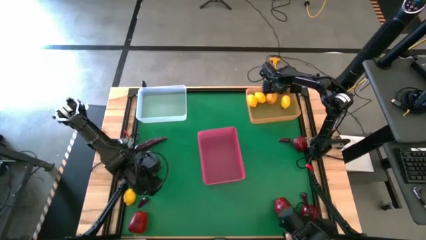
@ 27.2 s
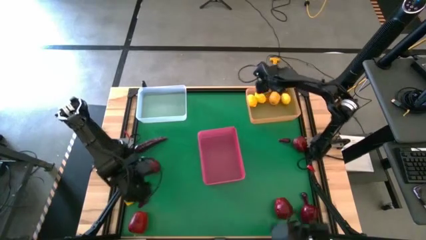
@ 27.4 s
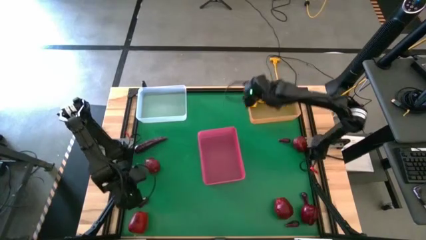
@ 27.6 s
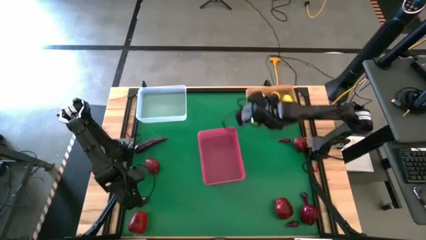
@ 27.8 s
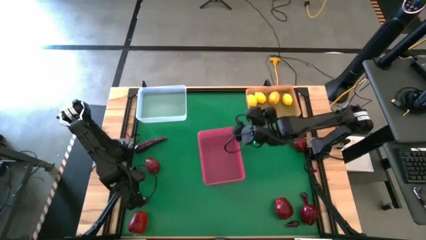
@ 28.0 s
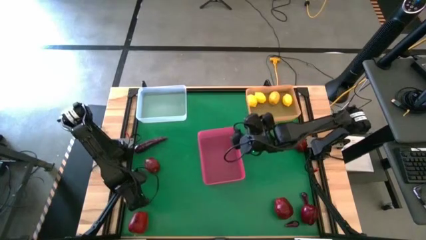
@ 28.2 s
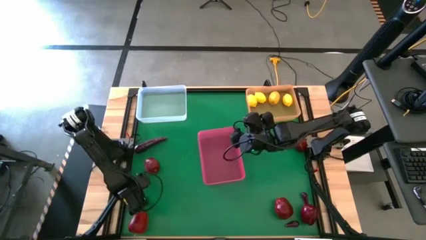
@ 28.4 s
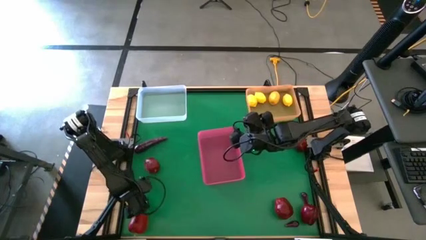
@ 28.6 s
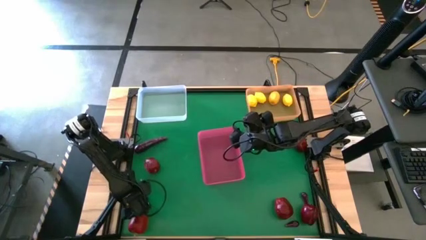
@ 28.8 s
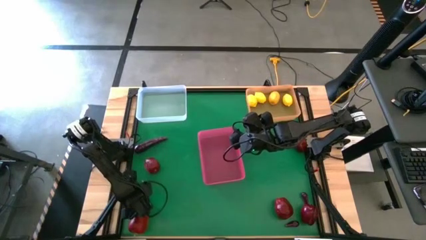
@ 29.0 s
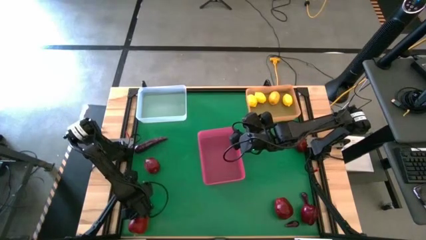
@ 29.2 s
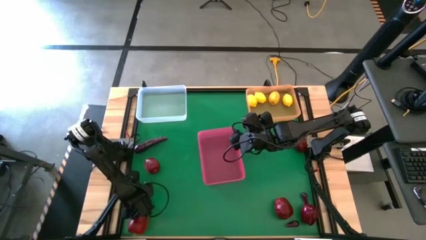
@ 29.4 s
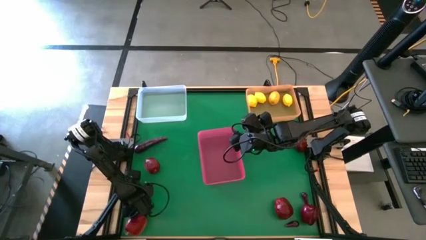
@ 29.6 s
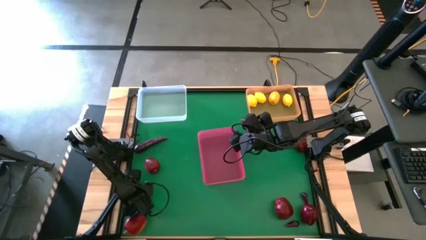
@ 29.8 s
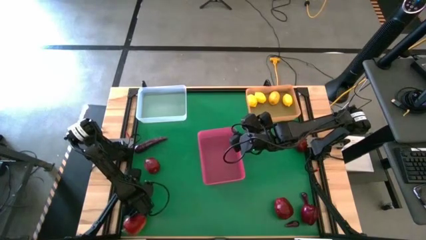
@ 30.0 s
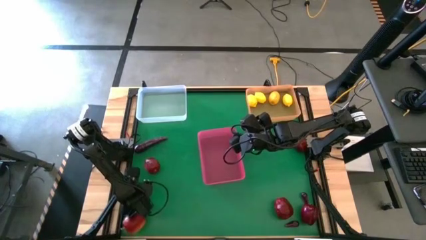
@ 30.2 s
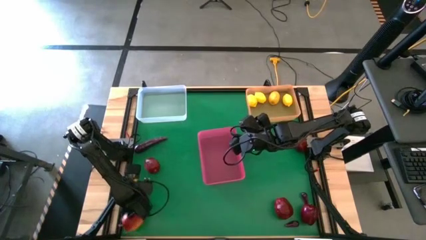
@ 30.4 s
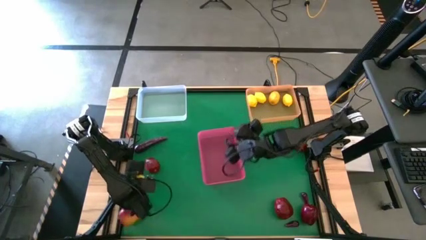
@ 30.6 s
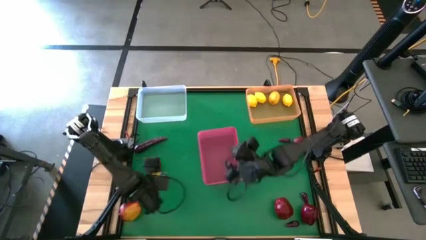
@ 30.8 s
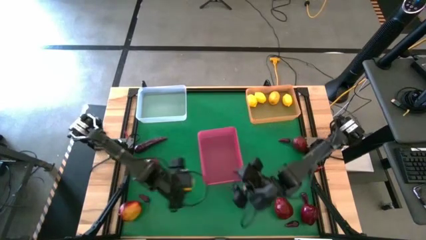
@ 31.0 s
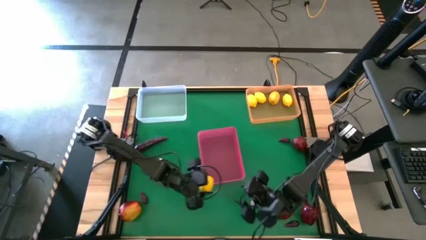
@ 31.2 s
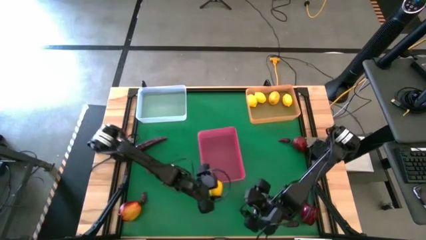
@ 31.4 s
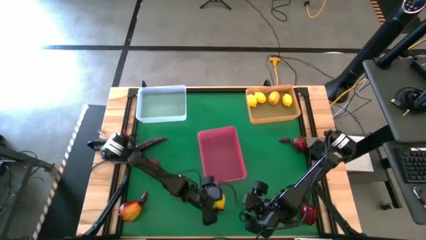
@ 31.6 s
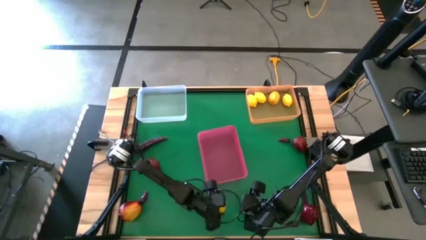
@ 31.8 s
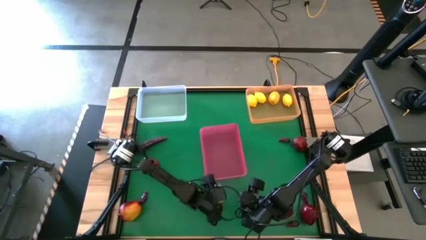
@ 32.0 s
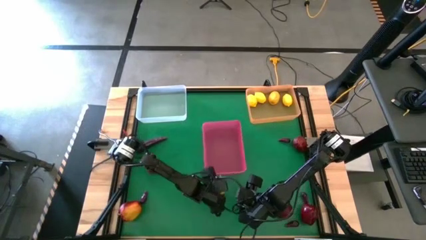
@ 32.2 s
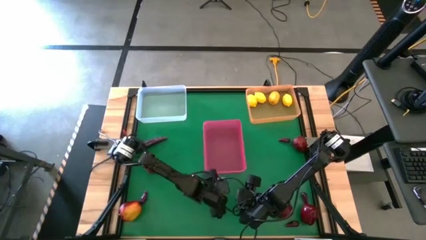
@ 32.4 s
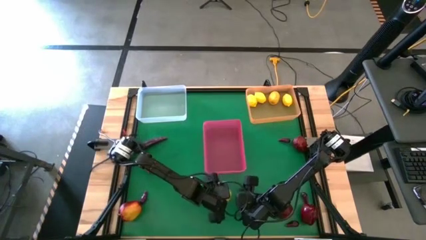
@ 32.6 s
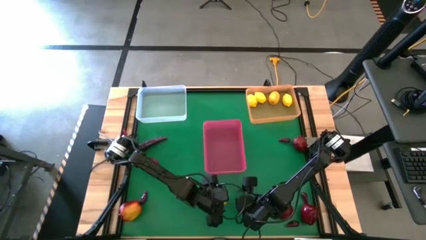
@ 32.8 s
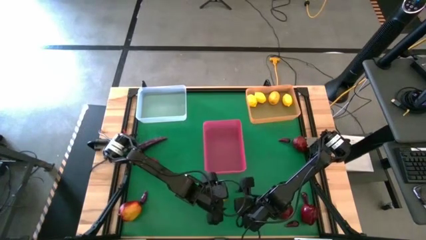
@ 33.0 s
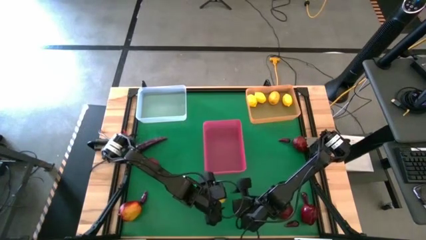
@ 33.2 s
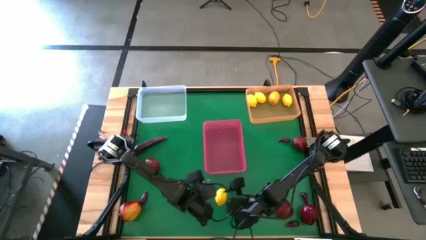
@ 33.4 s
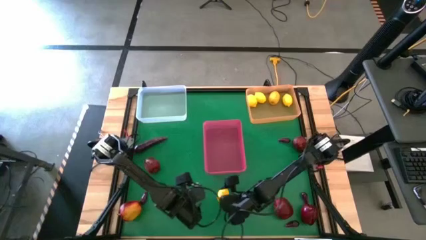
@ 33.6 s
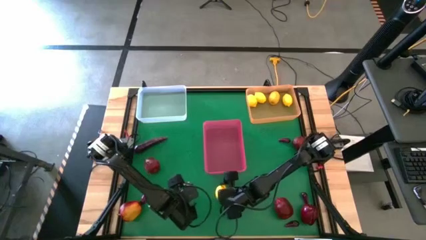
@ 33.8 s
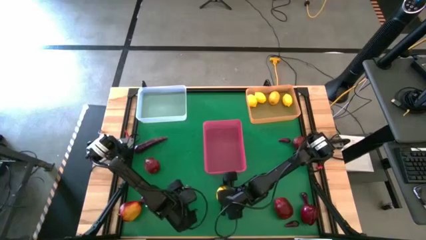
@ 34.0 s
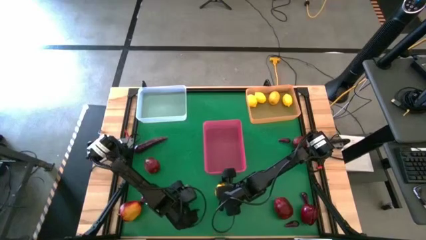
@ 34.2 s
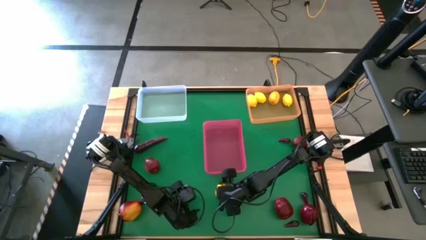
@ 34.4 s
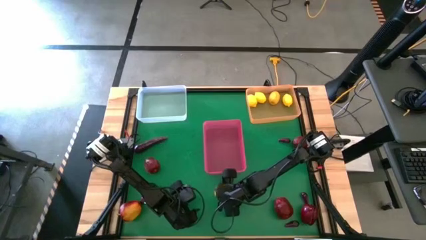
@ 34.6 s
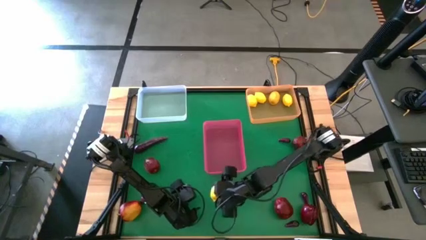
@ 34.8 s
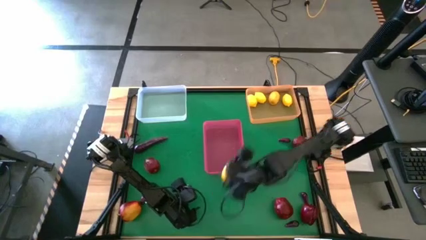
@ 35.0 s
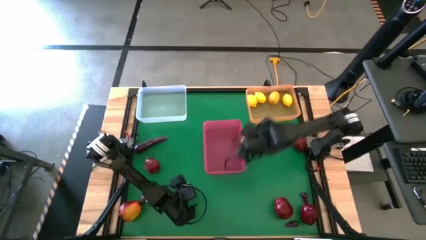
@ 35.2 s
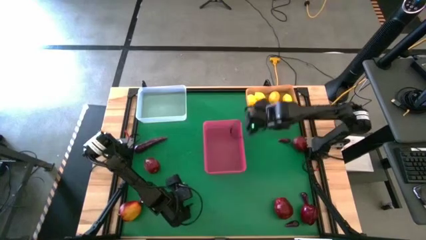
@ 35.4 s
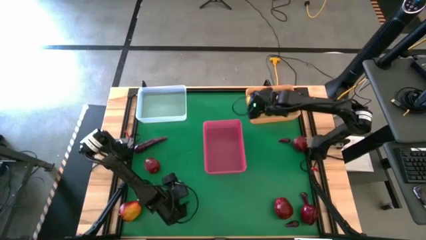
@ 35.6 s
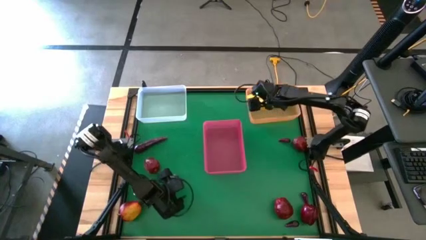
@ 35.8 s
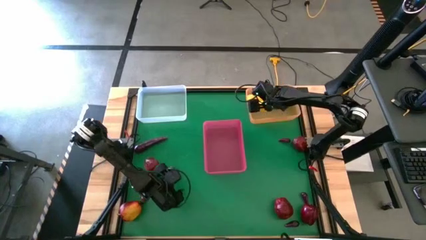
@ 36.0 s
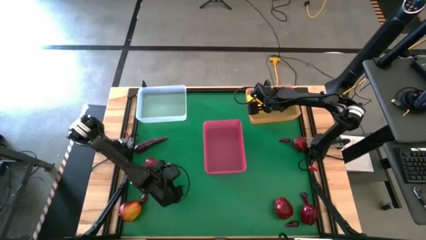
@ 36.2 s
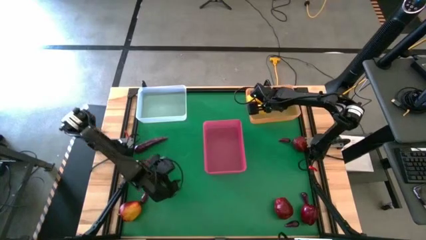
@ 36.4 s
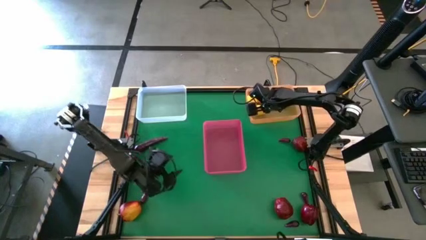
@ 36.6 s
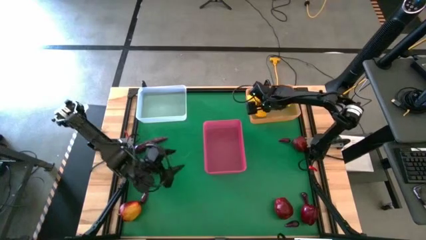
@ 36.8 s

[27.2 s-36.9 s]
Task: Sort produce into baskets
Put the lemon into the orange bin

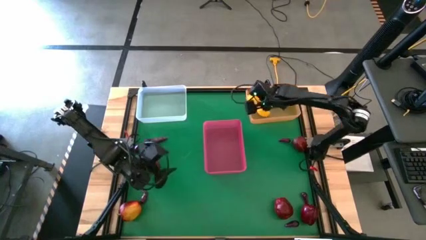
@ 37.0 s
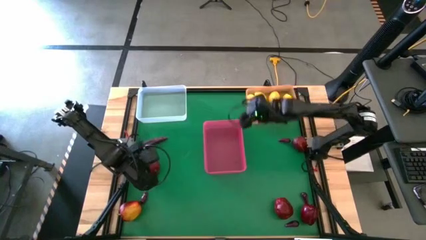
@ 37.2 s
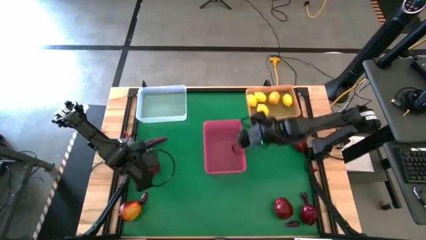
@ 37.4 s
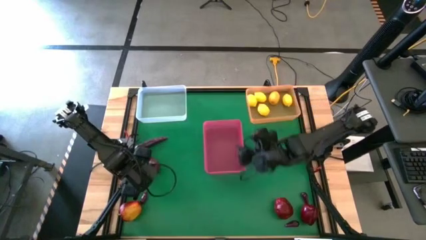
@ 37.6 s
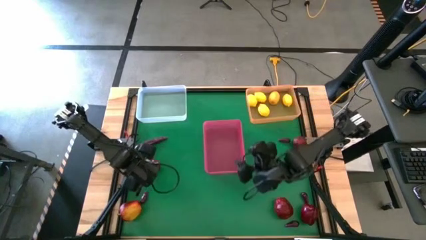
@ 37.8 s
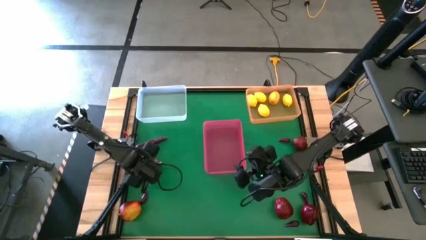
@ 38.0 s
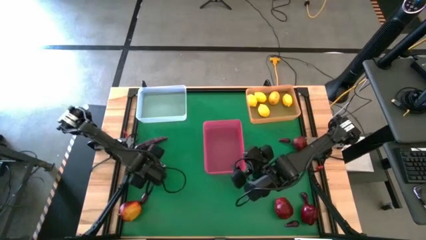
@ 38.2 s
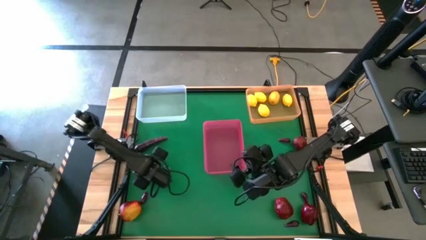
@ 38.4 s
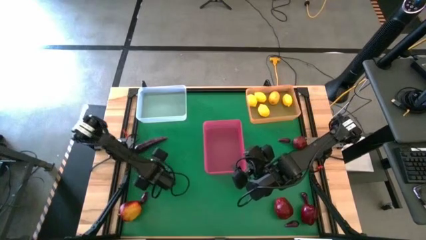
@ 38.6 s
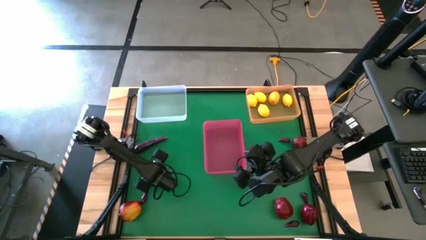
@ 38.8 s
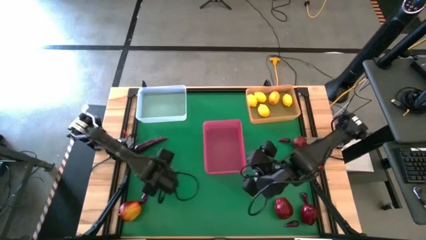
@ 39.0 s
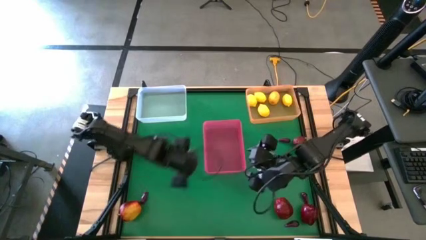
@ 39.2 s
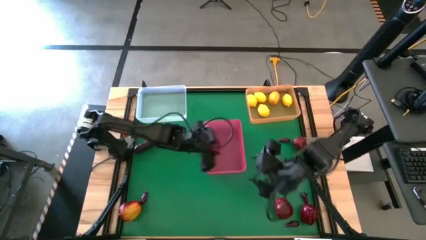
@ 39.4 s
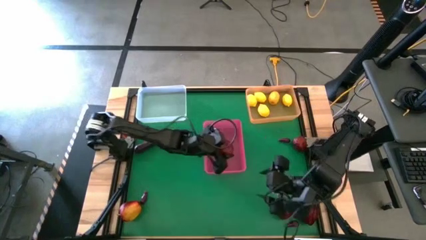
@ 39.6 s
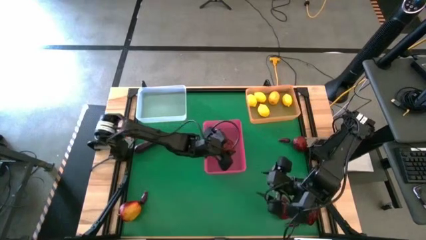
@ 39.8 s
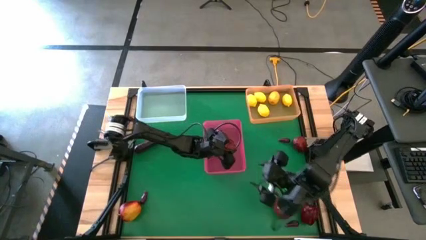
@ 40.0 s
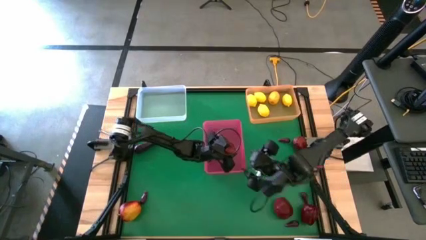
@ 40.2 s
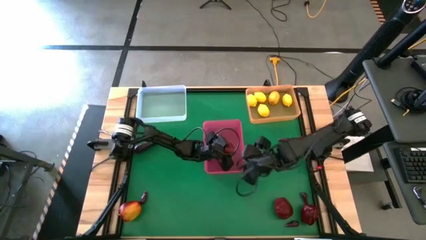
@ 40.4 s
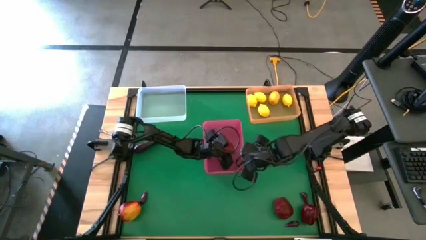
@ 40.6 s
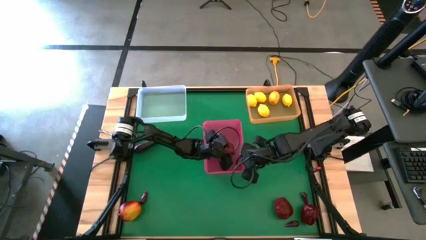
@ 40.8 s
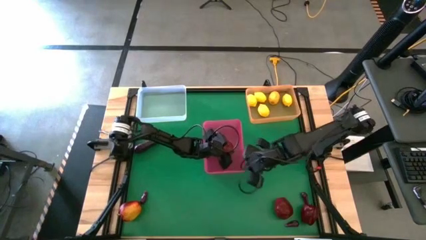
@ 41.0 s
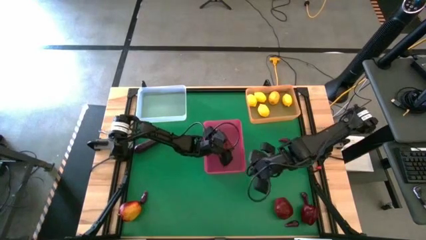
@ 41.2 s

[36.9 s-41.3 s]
Put the apple into the red bin

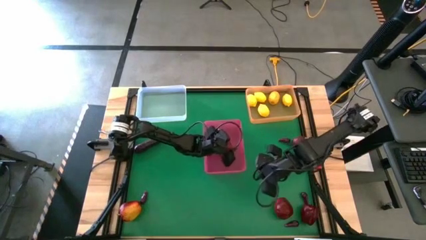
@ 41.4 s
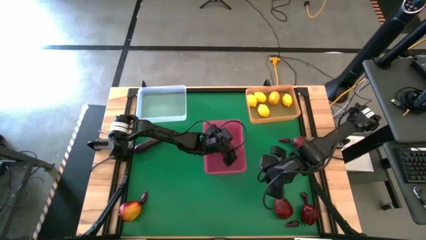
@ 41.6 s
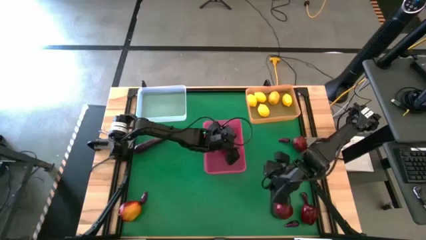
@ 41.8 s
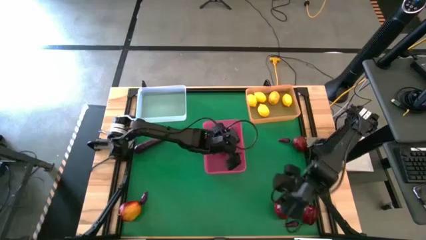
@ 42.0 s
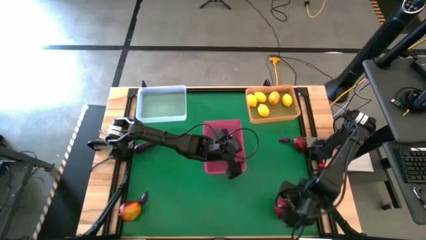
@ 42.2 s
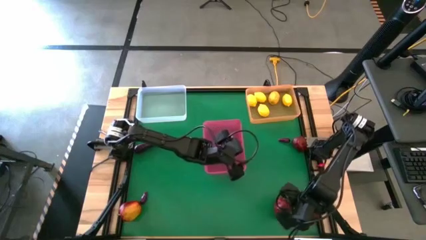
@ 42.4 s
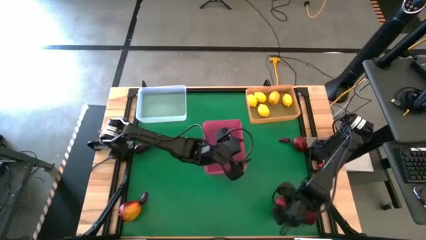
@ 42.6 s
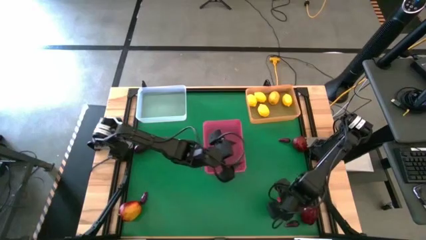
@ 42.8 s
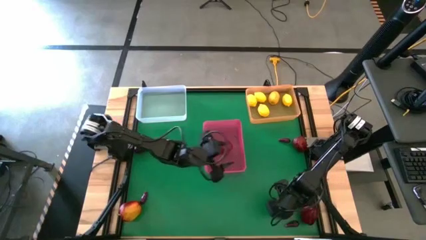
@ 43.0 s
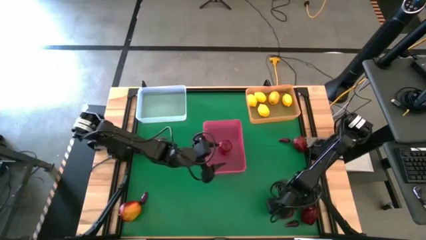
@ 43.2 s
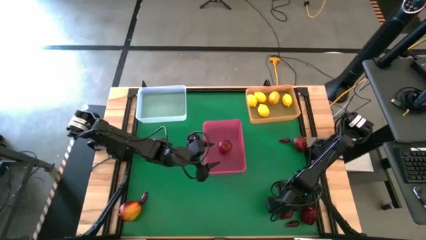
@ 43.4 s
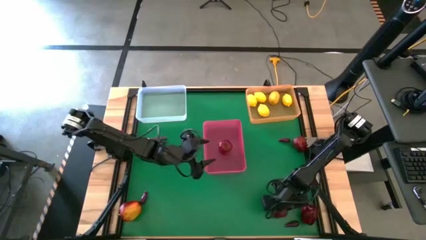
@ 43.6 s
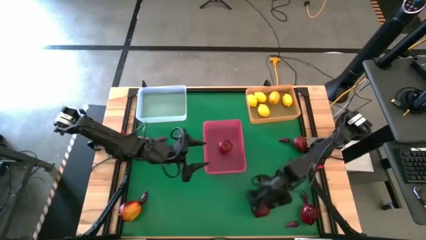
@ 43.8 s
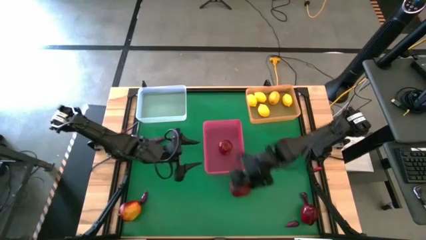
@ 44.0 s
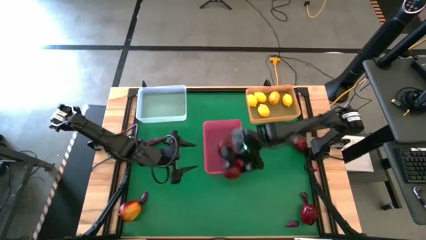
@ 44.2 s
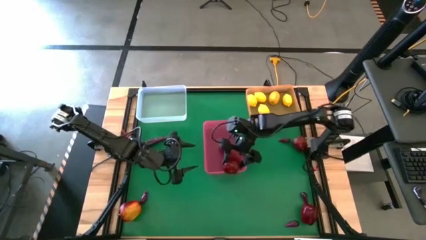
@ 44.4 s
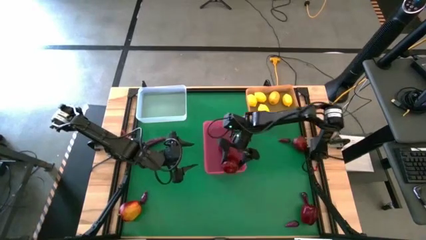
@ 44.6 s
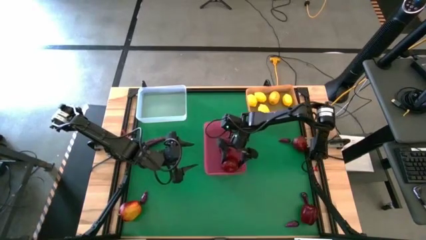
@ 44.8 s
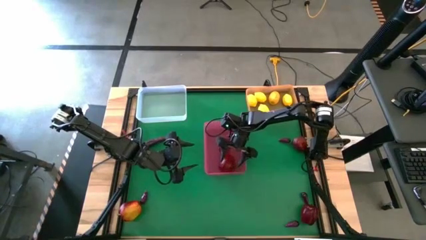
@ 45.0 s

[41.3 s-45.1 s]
Put the apple into the red bin
